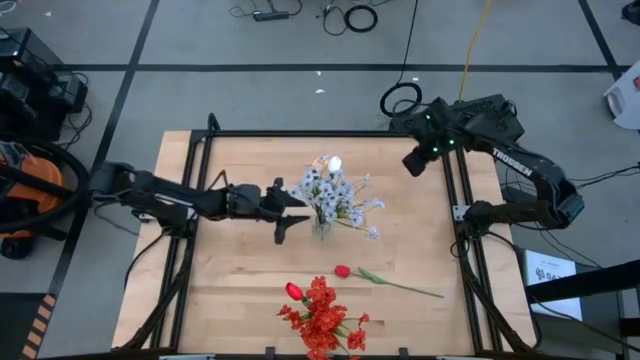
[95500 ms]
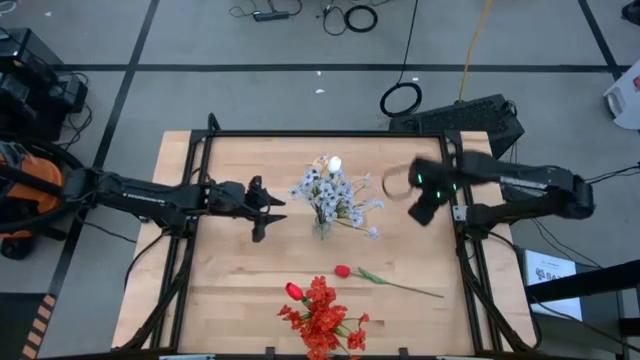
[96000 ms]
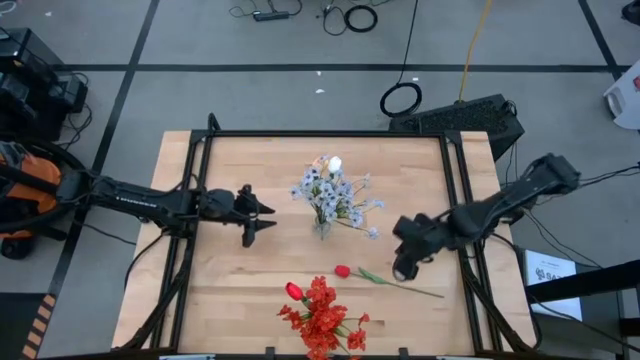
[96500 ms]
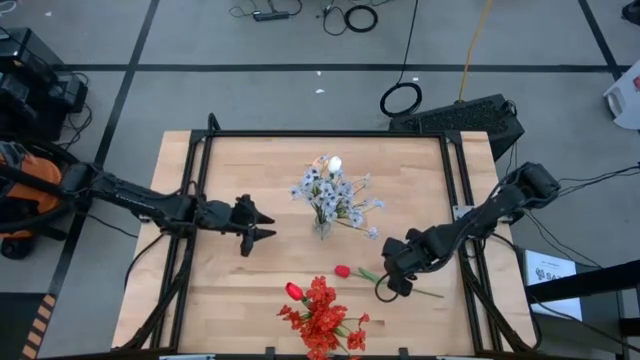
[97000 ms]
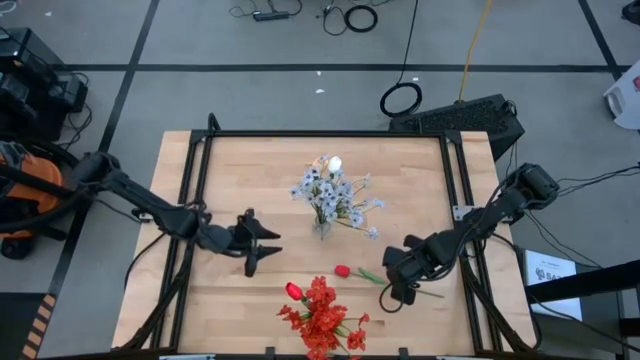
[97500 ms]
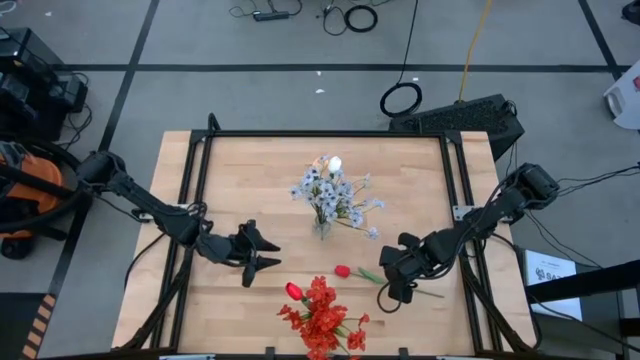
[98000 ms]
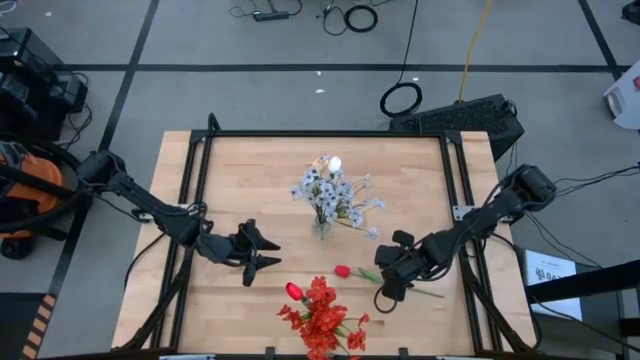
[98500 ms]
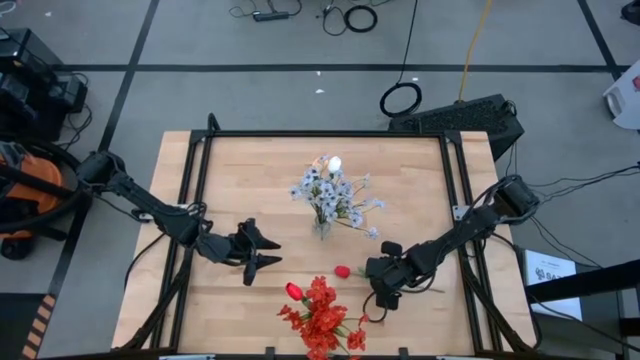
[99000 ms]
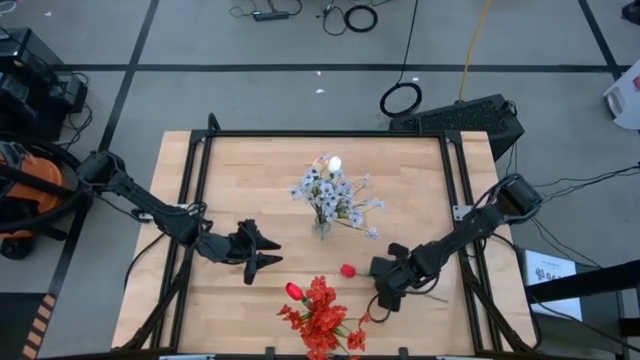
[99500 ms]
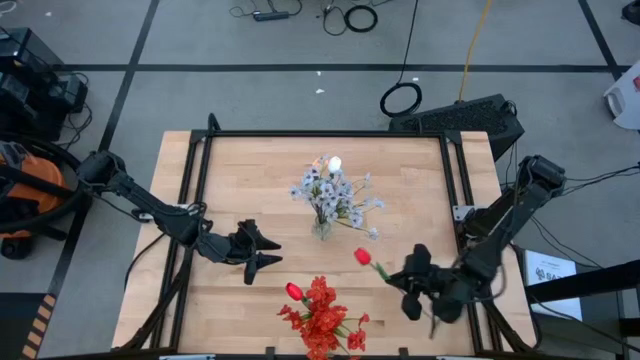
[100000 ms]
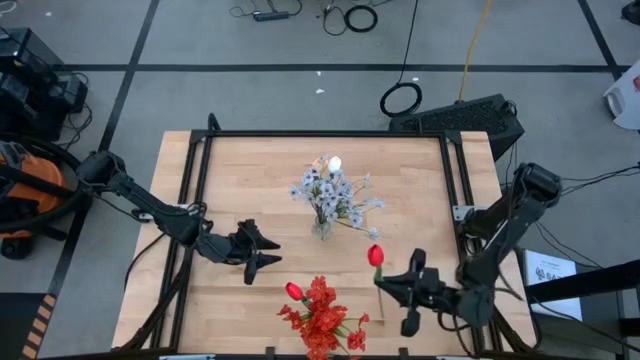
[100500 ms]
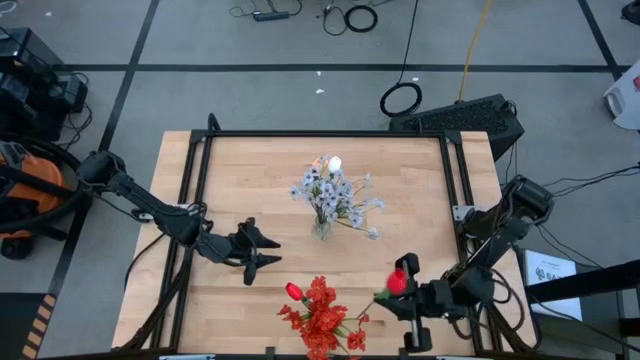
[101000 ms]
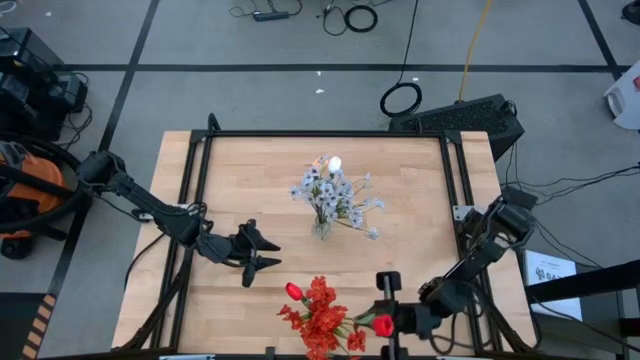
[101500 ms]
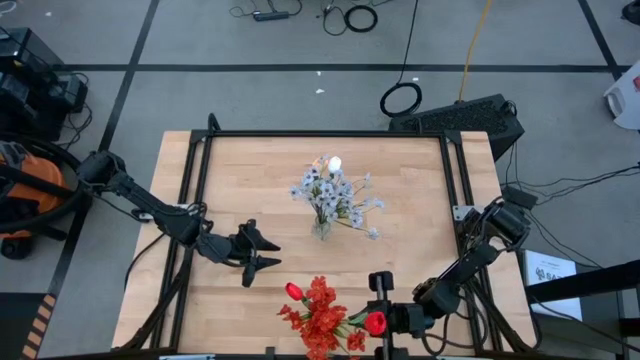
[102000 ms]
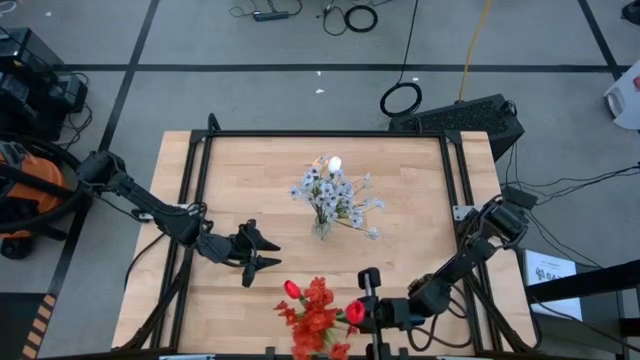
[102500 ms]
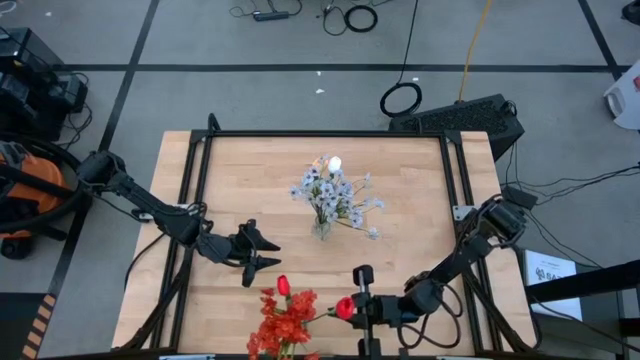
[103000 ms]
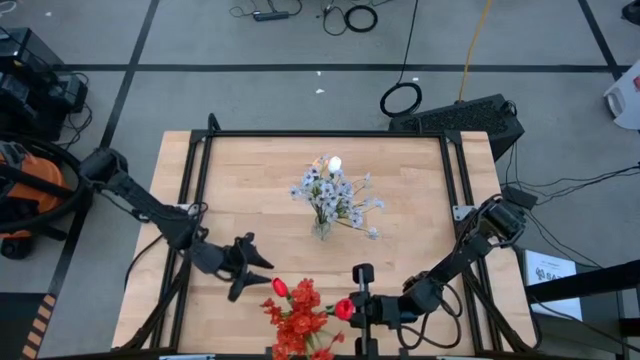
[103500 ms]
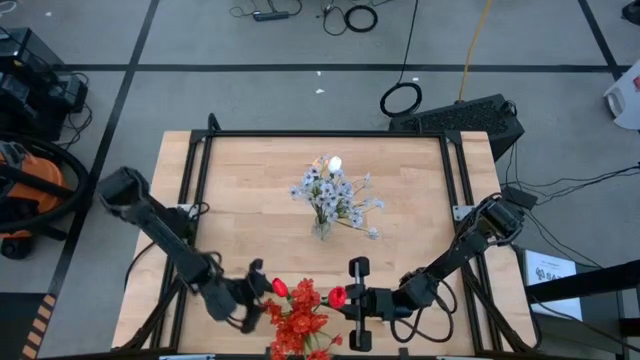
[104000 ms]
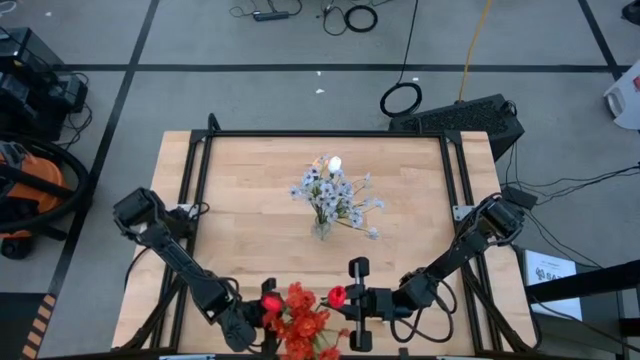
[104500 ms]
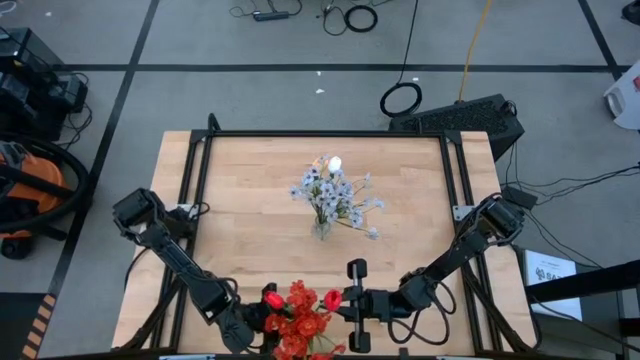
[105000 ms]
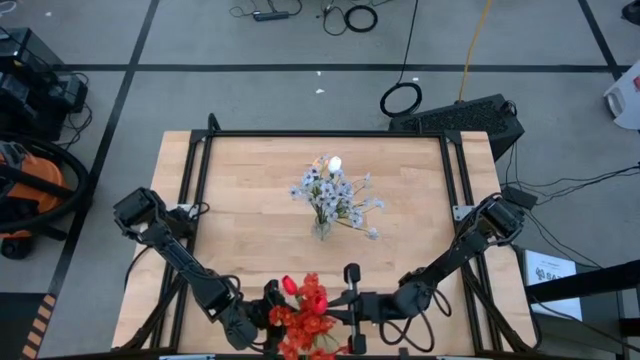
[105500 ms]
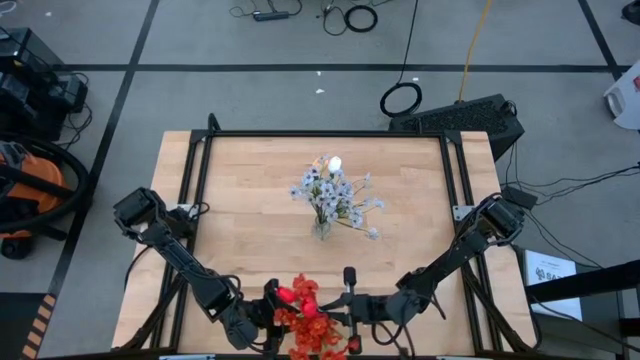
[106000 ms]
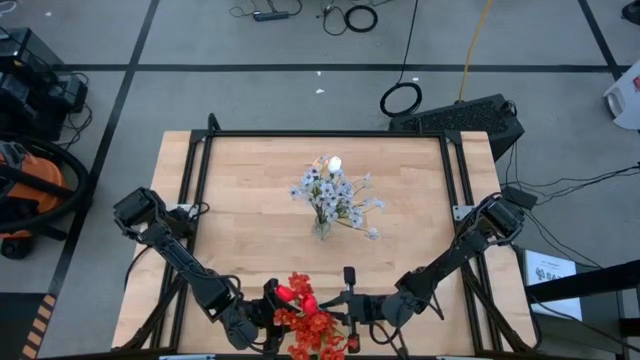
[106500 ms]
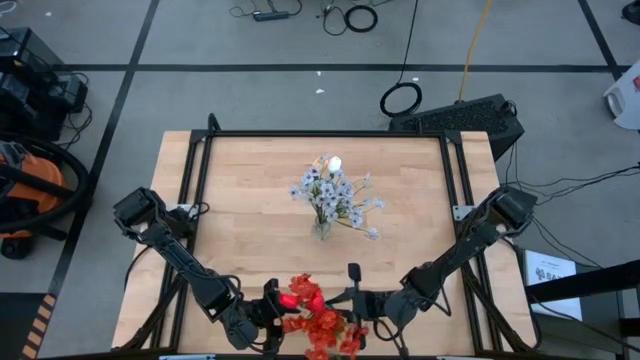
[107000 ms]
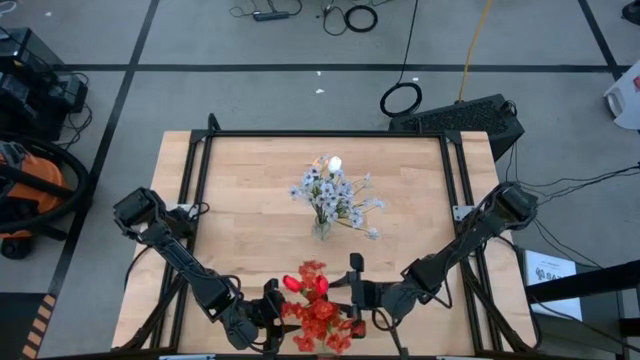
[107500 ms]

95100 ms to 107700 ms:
Task: Sort flowers into vase by color
Put the red tulip into the blue vase

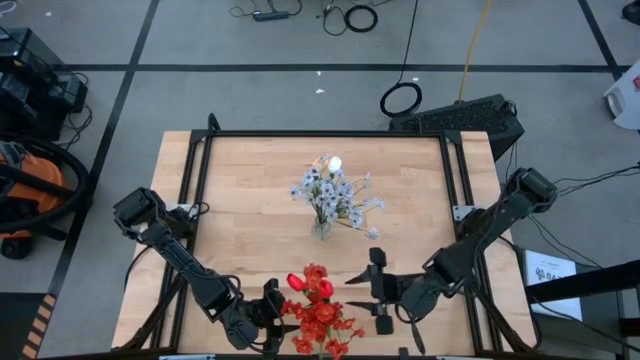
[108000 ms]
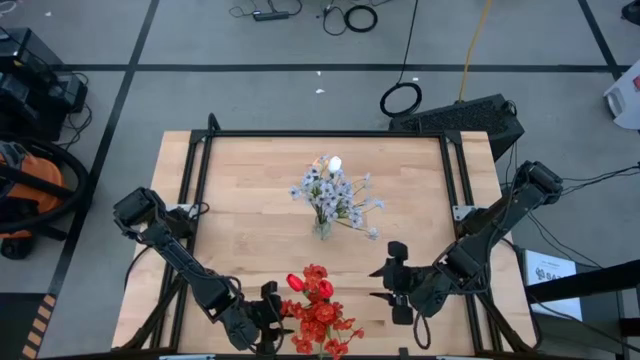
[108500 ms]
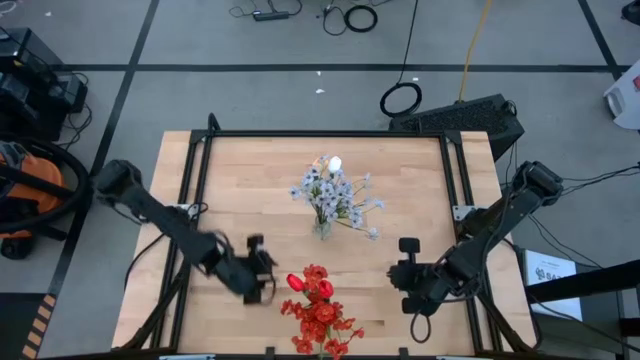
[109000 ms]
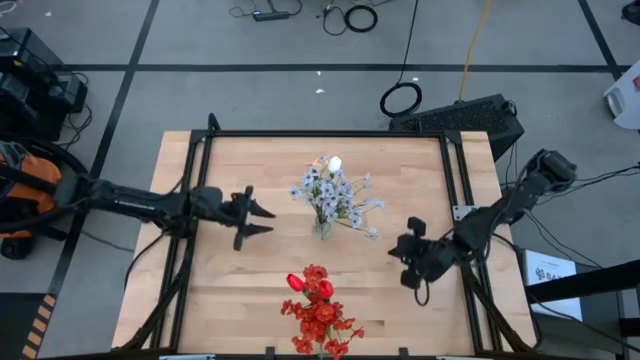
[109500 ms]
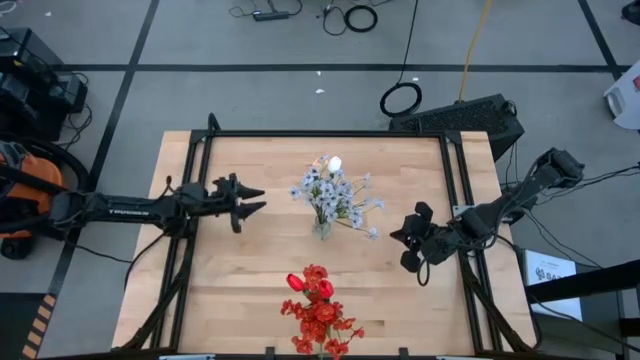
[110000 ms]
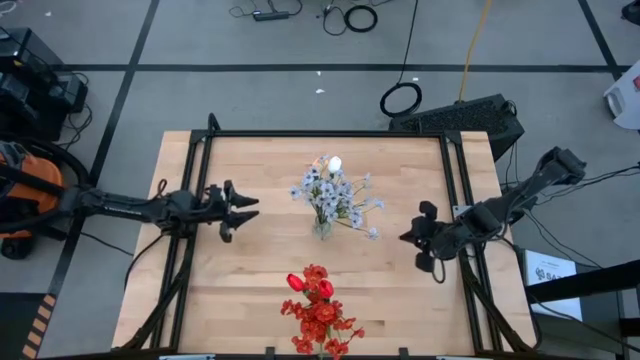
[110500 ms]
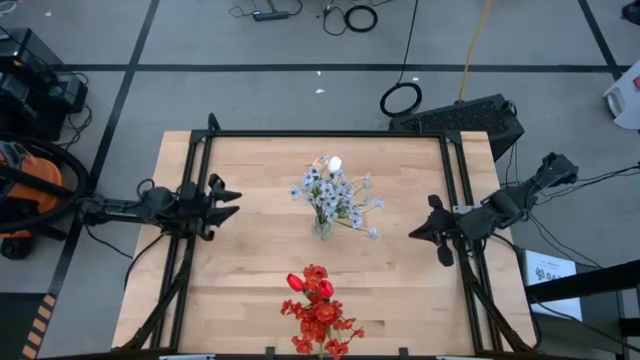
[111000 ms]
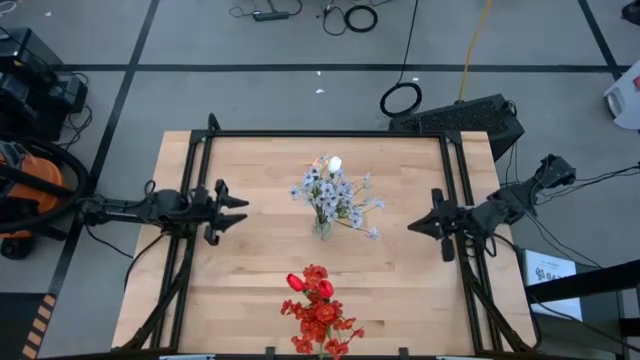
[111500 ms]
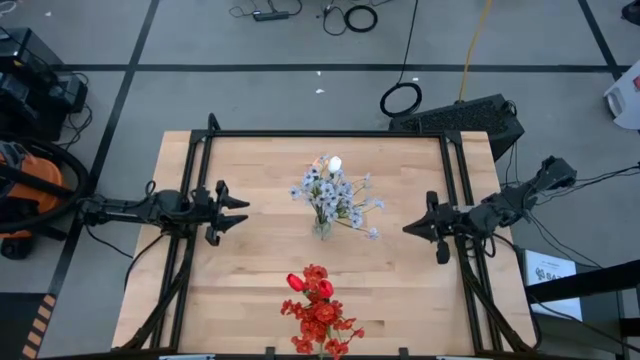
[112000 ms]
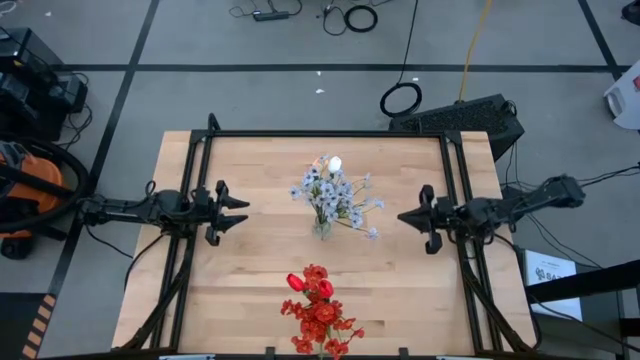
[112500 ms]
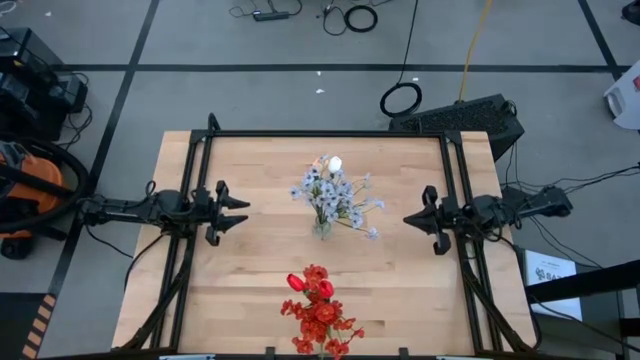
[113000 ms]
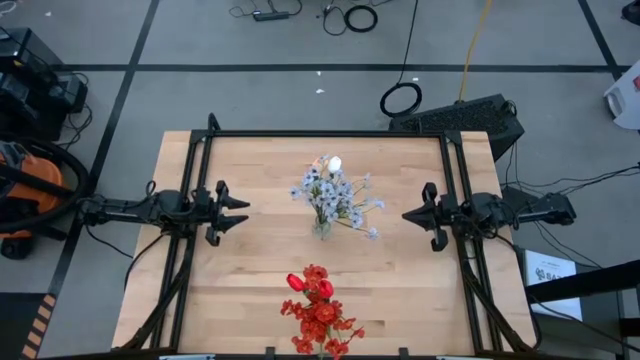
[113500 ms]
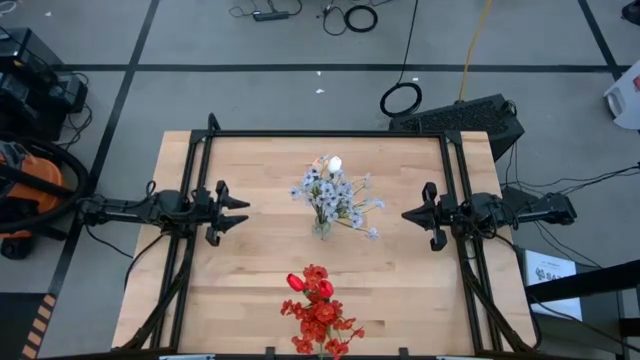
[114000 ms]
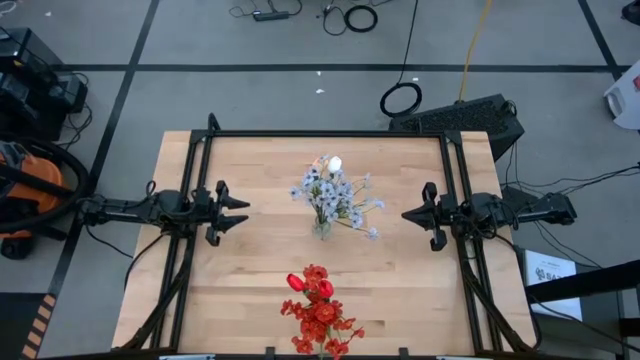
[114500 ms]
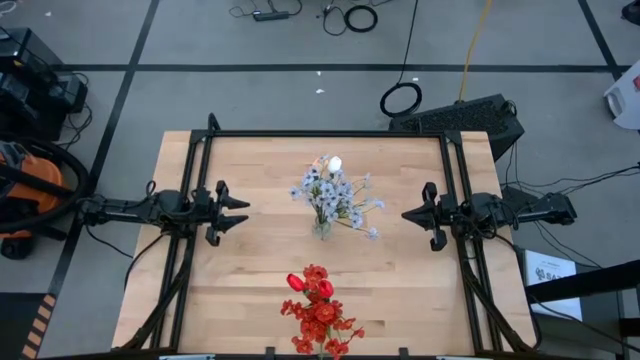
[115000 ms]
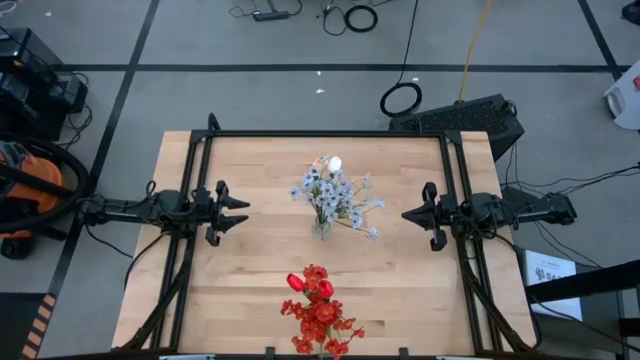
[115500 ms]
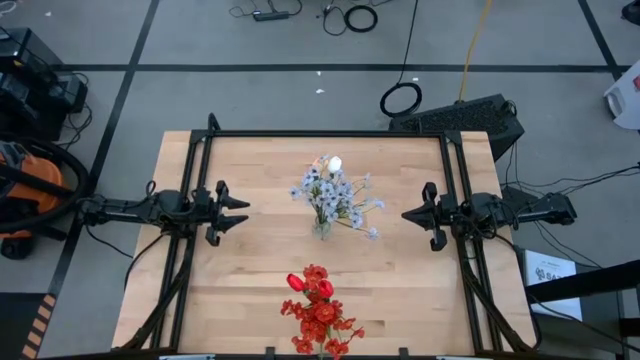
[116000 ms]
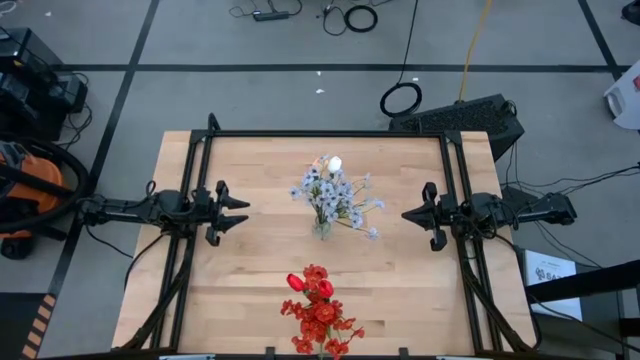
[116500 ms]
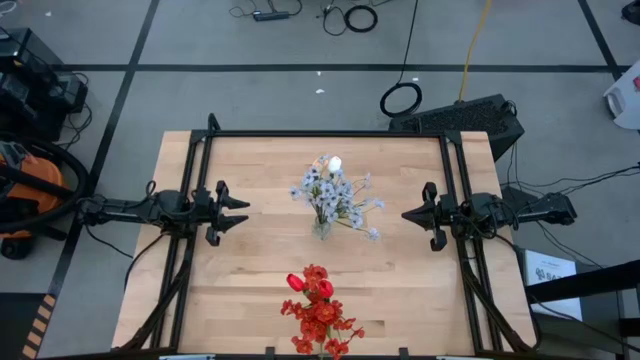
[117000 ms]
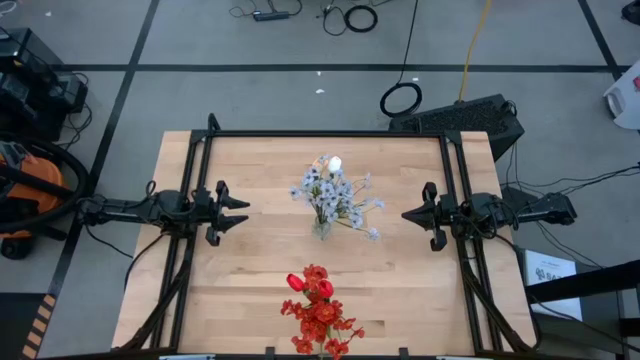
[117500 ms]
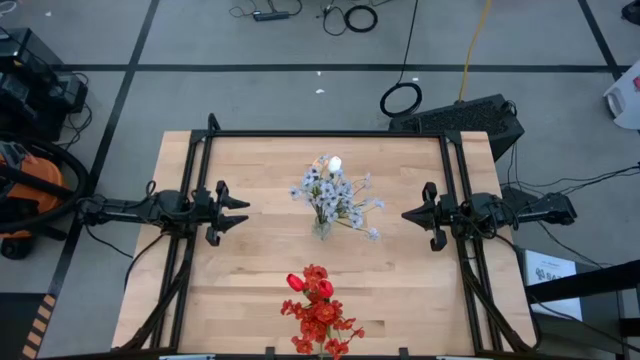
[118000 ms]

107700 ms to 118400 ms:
Return to Home Position
